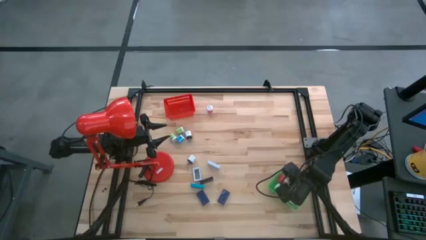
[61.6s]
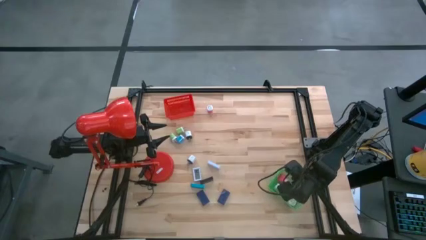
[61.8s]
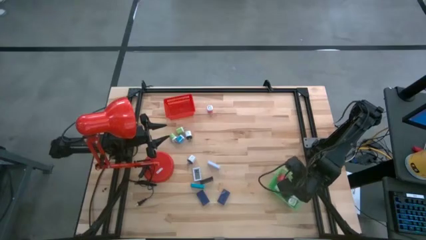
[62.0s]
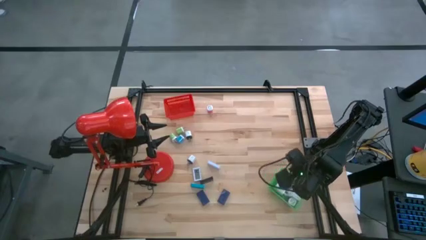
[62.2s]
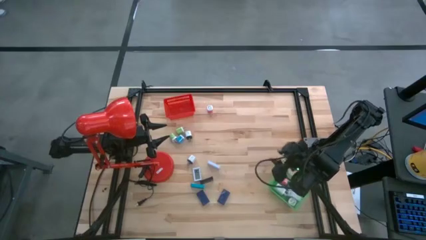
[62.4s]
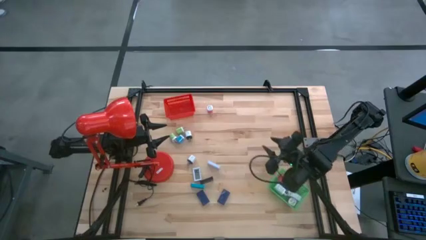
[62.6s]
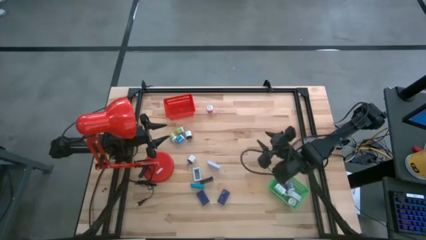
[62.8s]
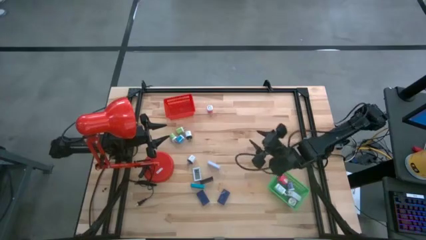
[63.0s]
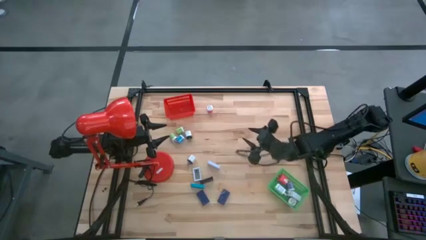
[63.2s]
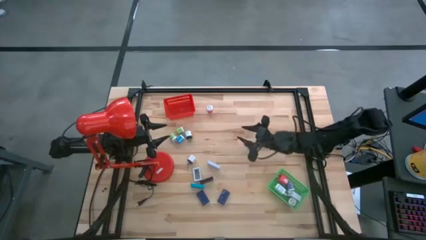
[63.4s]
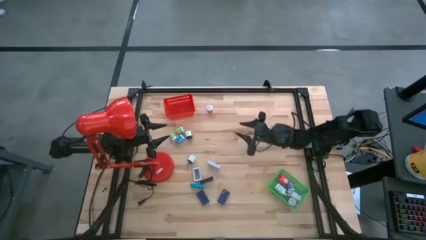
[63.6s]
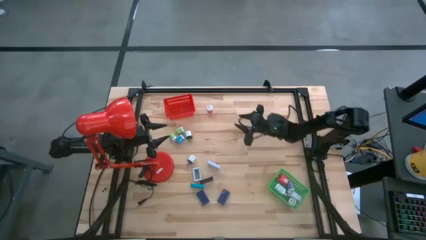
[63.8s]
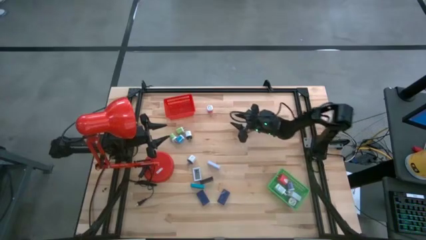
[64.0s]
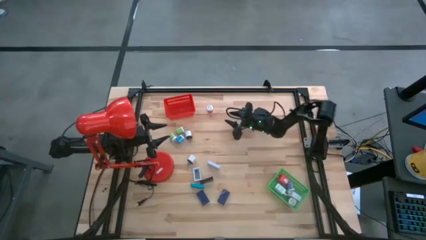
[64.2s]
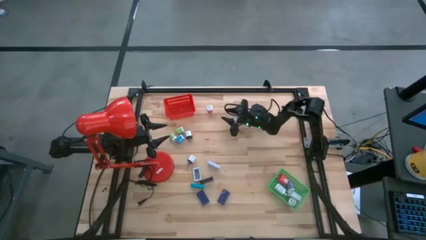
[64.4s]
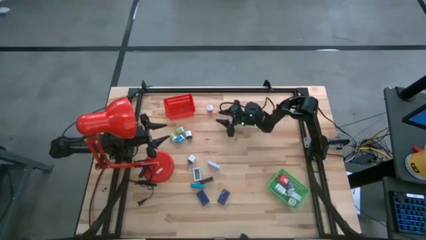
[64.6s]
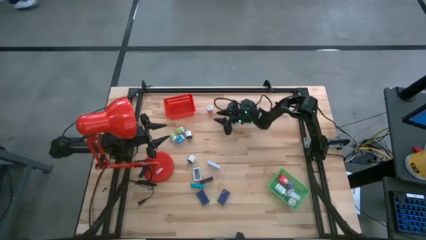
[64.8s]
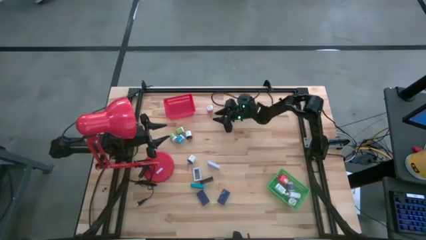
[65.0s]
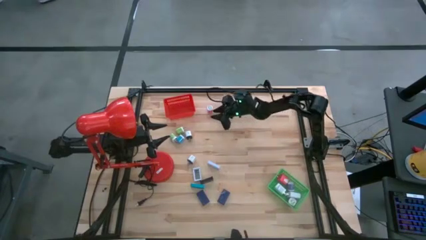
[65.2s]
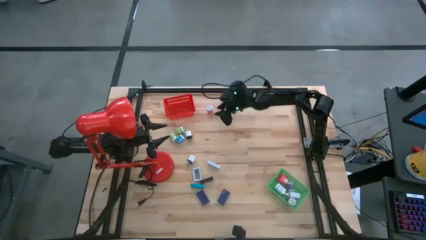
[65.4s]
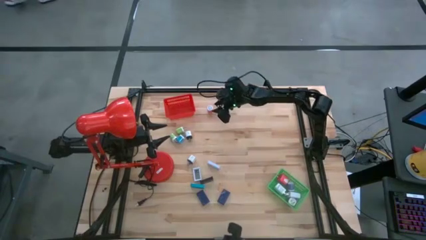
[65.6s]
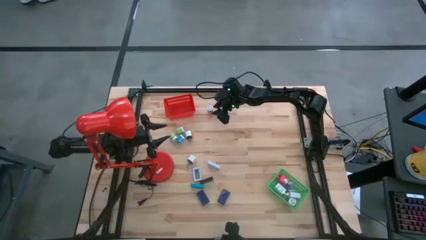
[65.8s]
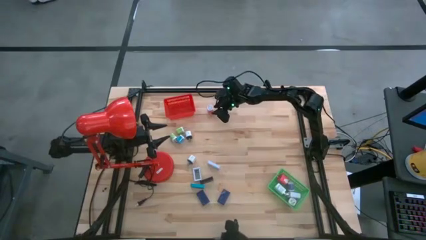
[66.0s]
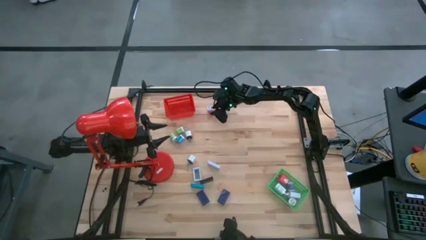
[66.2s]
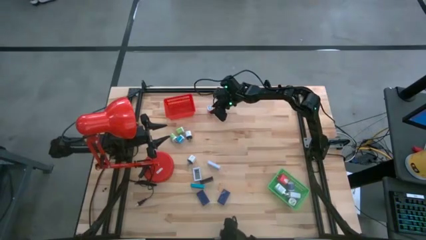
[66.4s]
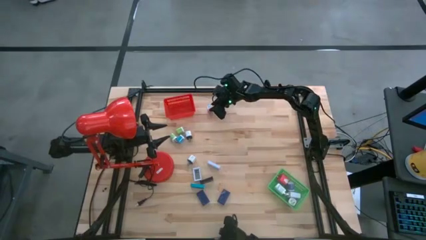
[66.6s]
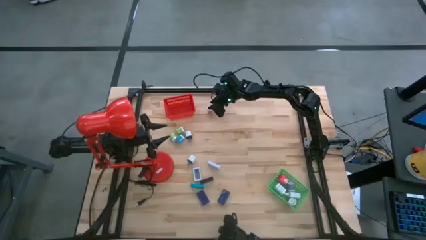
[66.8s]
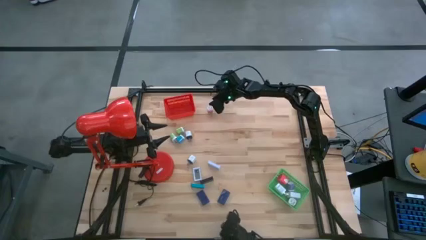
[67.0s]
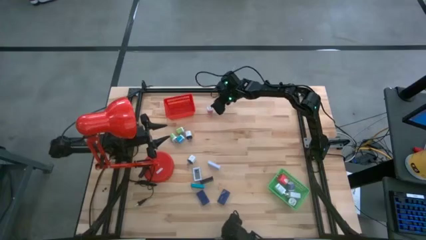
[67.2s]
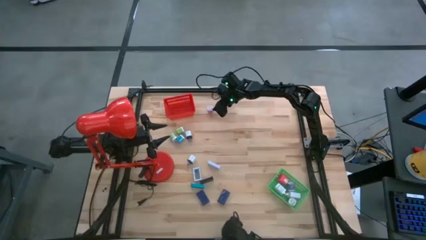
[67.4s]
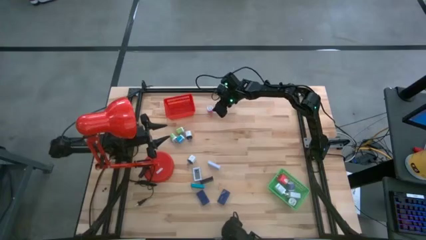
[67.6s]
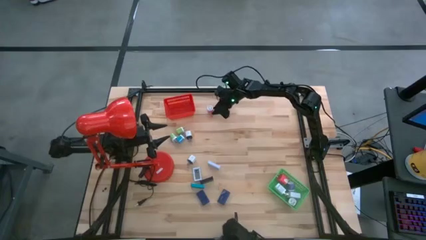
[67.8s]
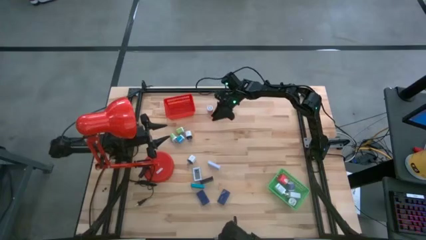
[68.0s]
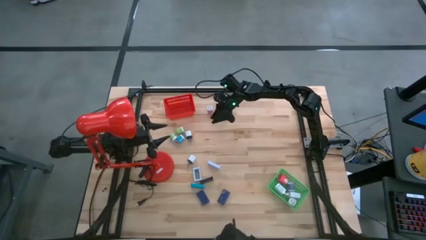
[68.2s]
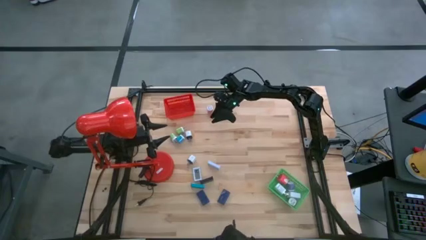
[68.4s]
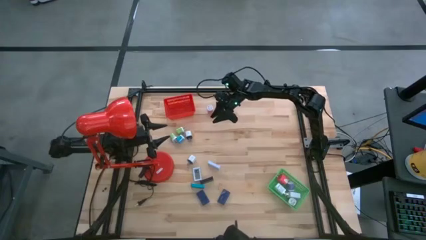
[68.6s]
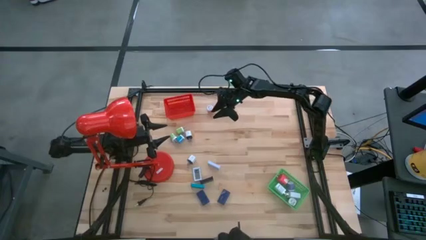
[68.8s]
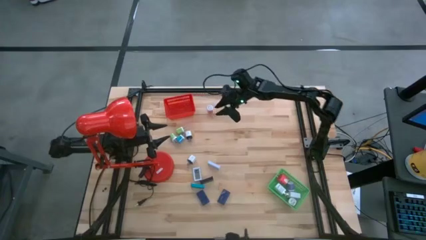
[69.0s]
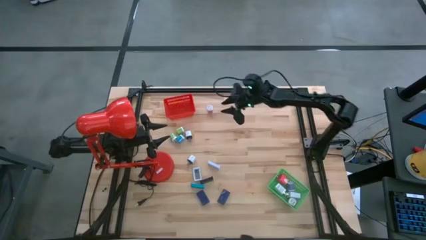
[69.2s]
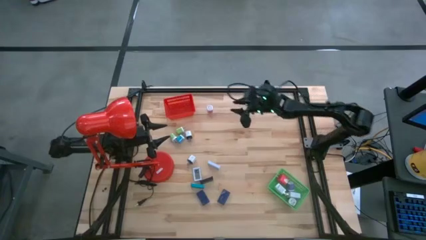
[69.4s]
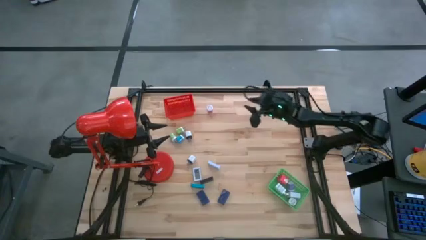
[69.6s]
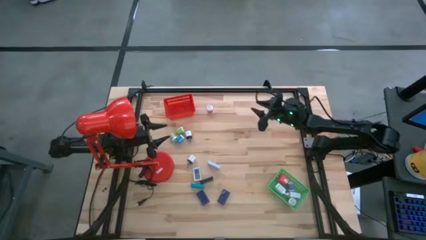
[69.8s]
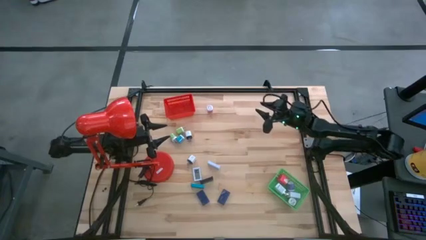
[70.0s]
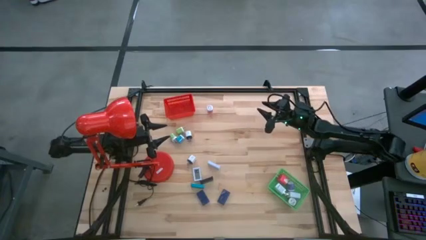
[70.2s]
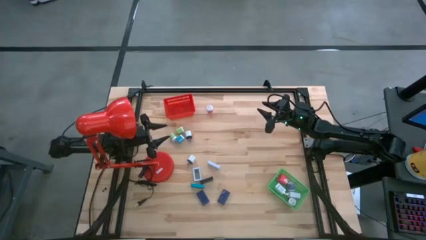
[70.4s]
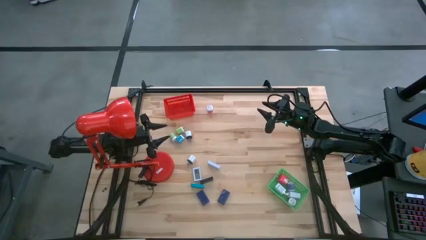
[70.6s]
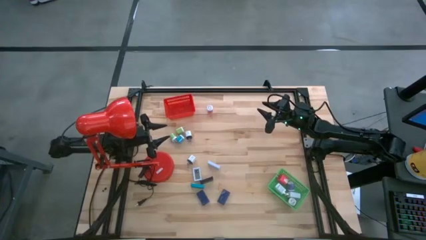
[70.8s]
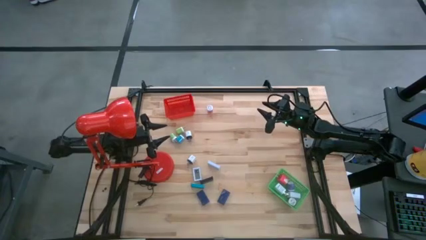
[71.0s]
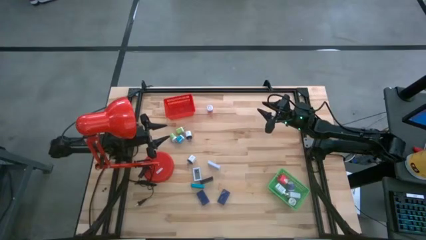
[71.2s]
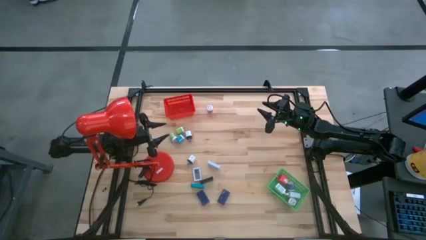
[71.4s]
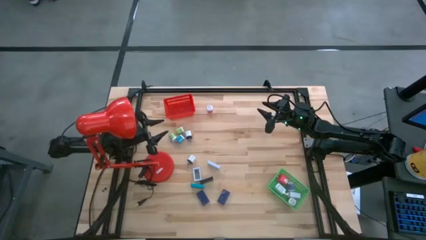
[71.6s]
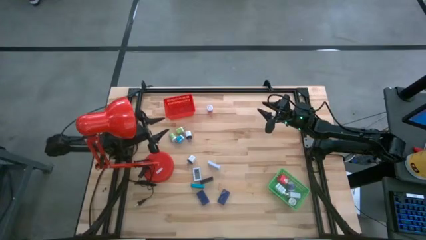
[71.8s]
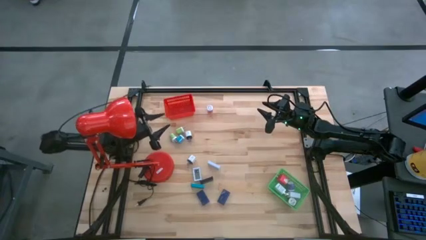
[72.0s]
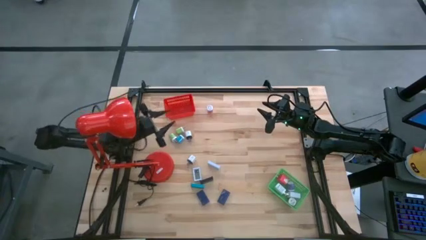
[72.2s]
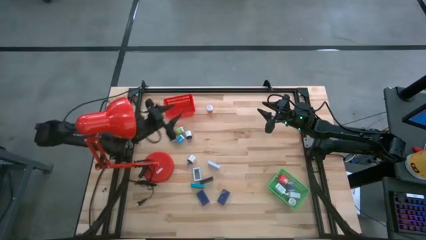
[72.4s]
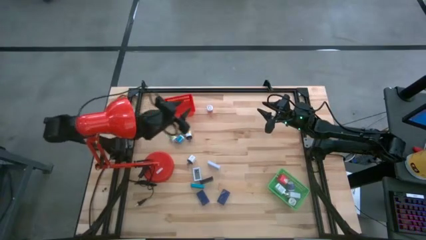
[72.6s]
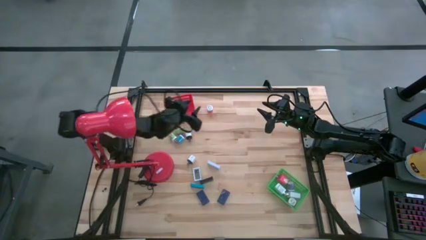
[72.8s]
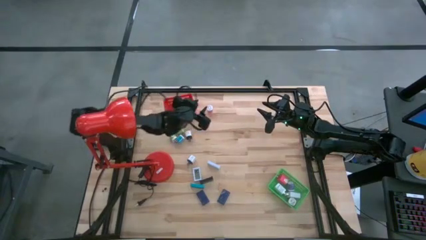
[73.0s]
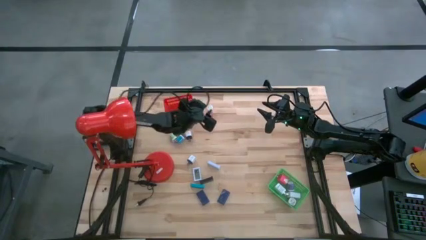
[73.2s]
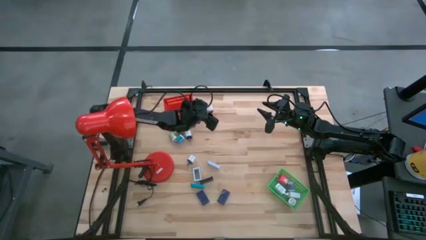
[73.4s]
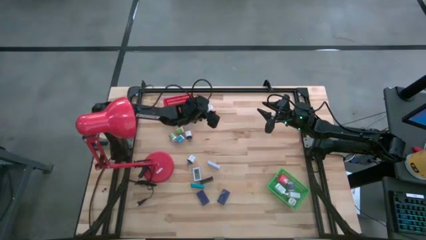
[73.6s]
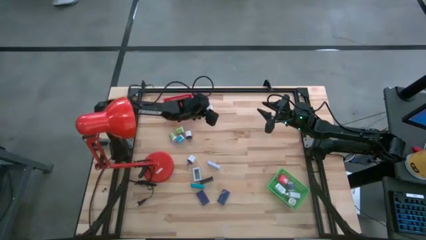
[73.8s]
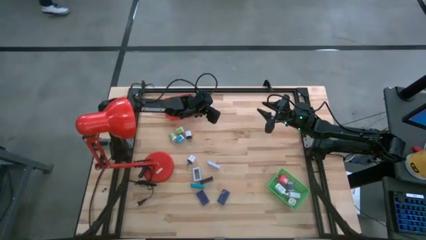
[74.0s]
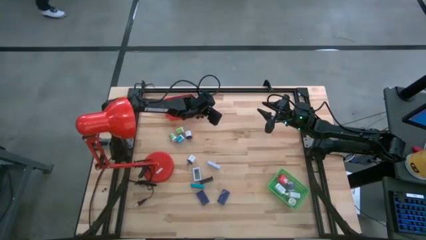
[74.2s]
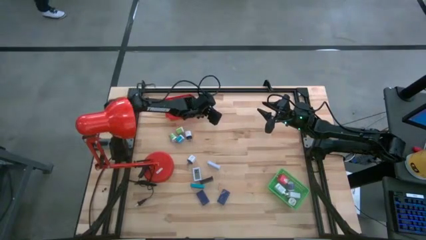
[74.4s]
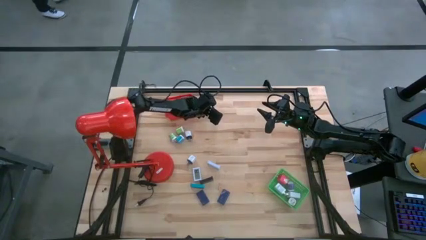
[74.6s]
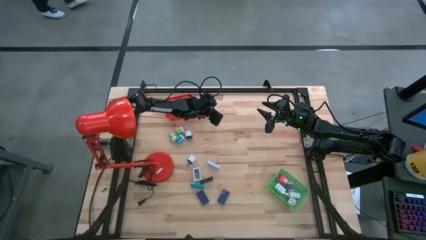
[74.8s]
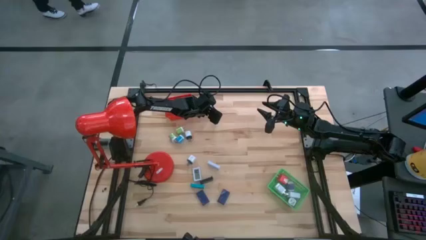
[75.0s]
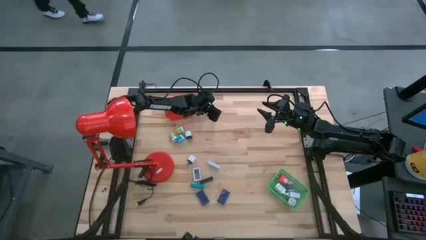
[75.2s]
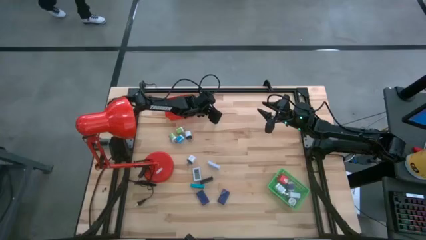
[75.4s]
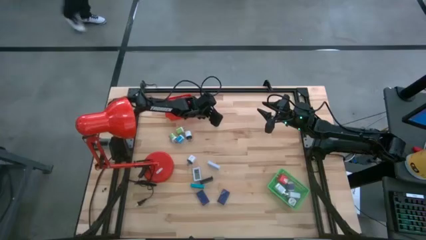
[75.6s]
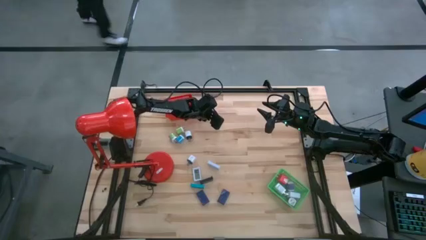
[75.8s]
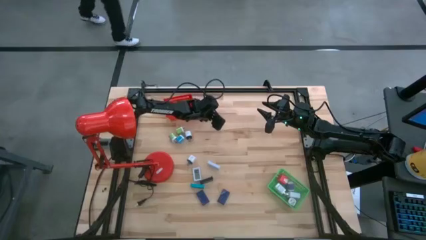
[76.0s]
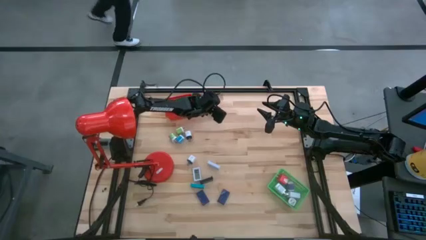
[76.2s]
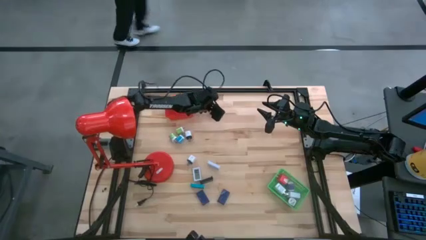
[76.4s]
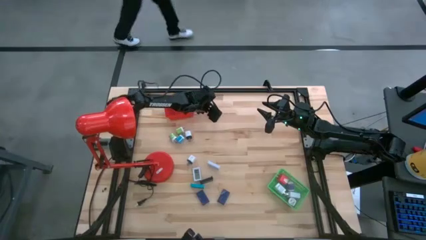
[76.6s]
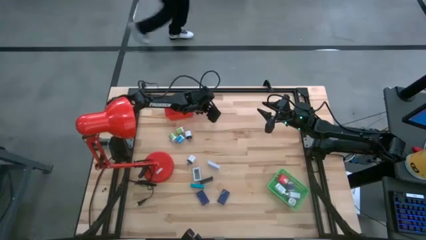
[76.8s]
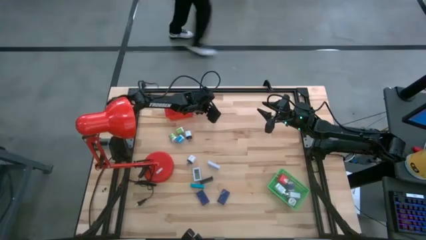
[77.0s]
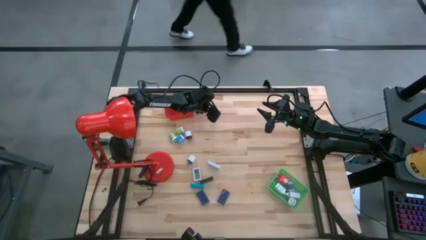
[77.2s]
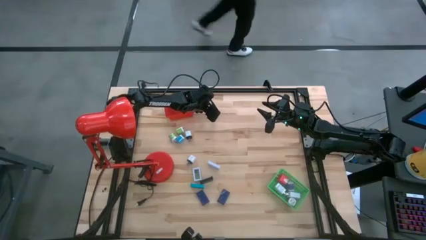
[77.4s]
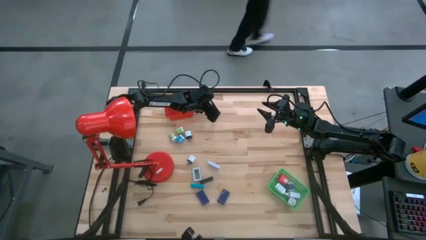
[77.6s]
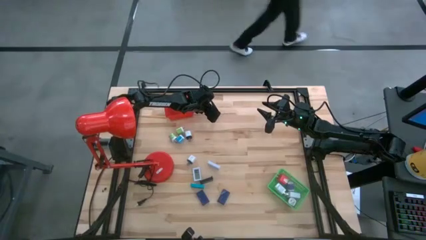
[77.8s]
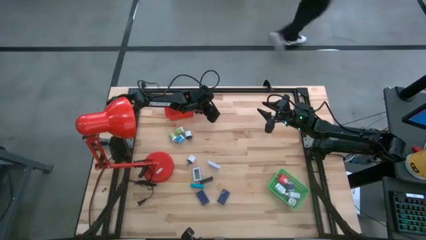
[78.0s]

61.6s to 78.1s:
Task: Pick & Place Office items
Put the pink white charger adapter into the green bin
